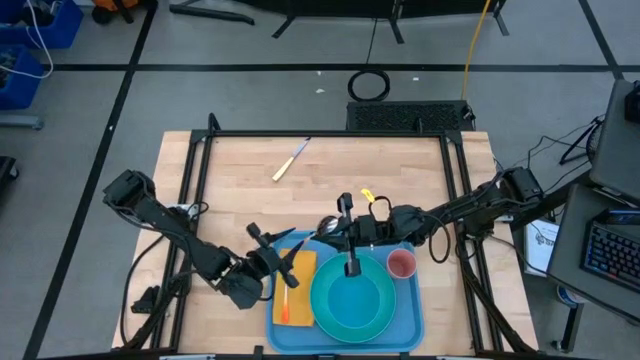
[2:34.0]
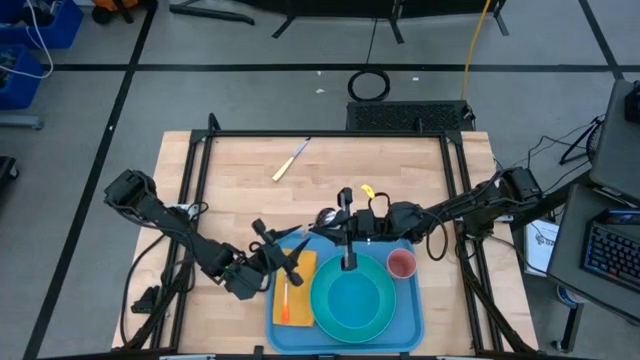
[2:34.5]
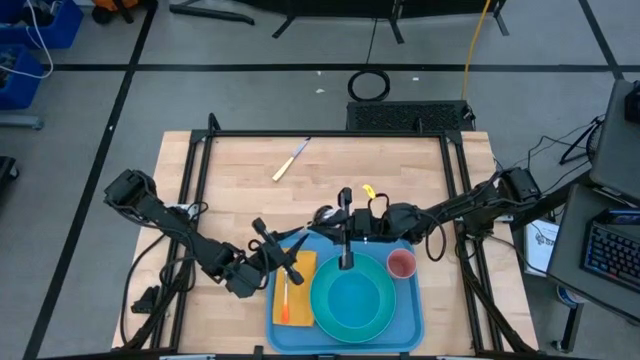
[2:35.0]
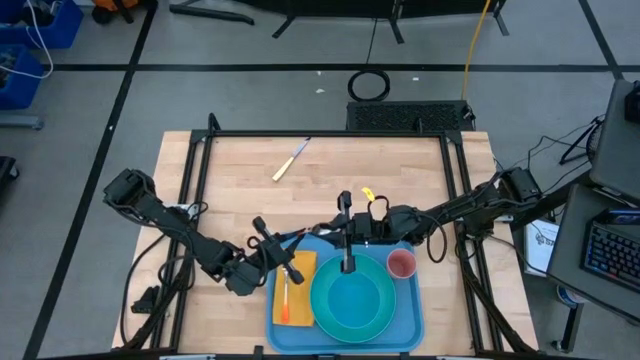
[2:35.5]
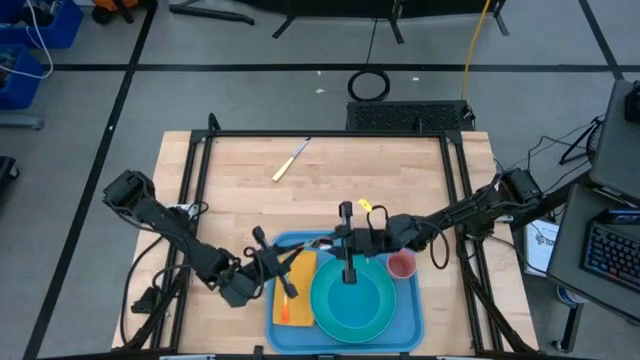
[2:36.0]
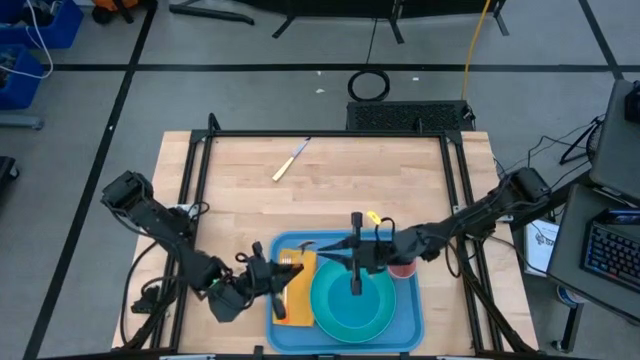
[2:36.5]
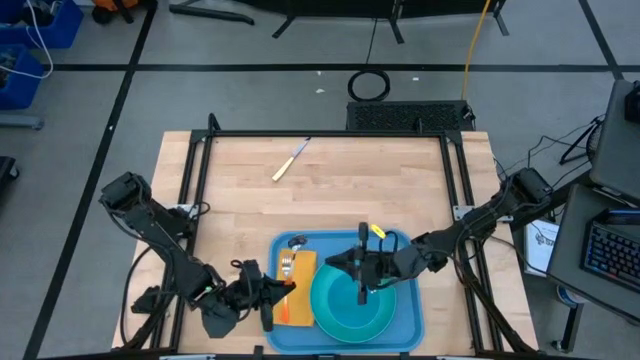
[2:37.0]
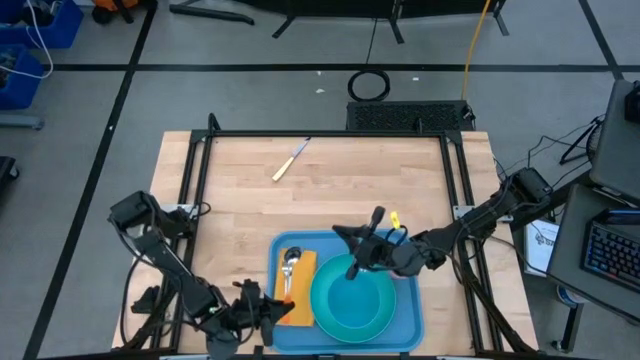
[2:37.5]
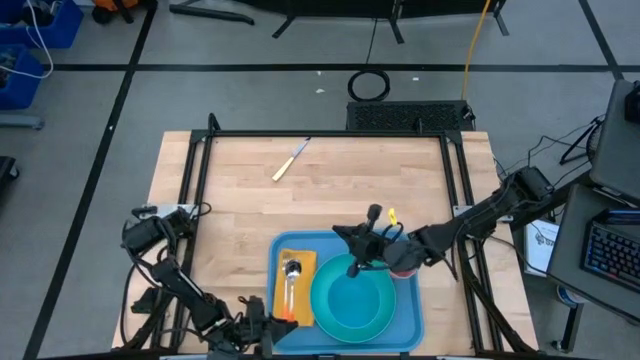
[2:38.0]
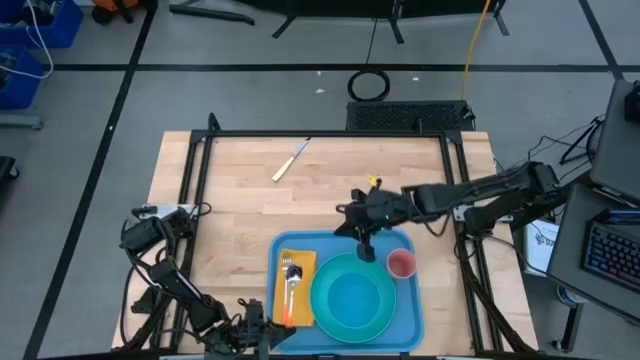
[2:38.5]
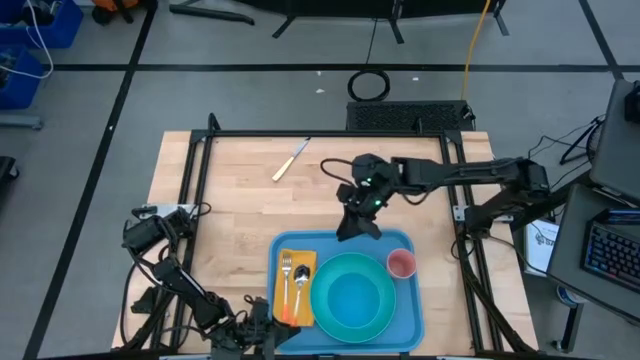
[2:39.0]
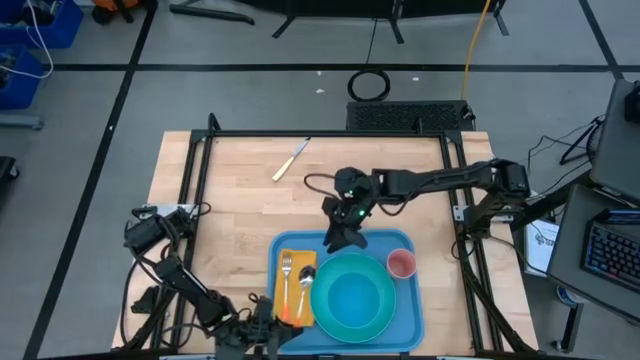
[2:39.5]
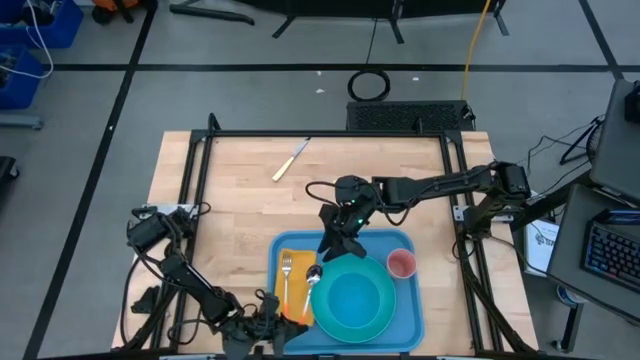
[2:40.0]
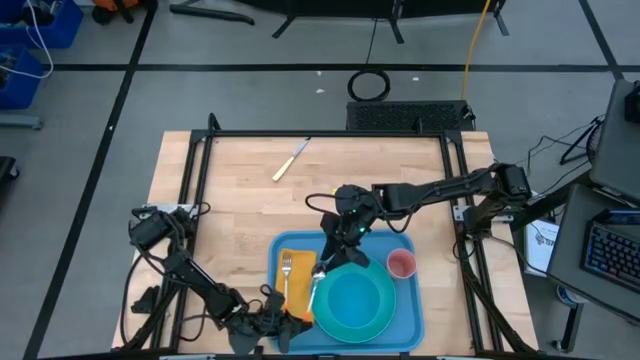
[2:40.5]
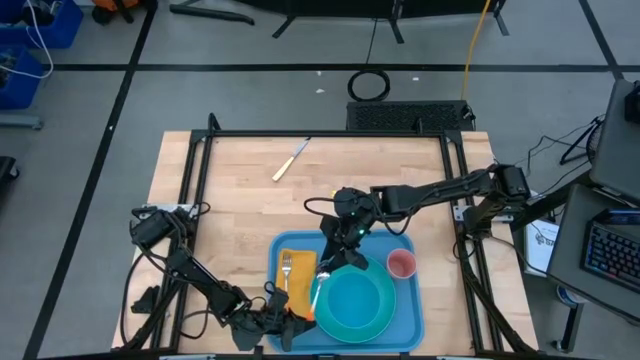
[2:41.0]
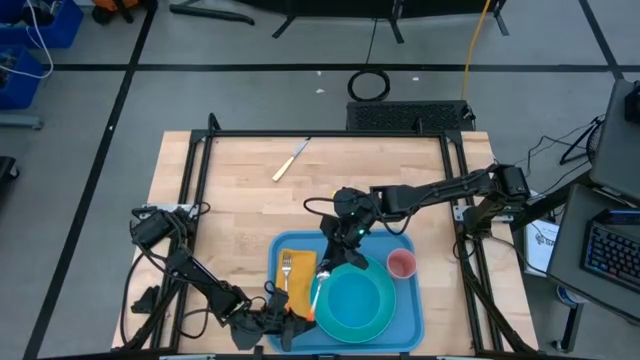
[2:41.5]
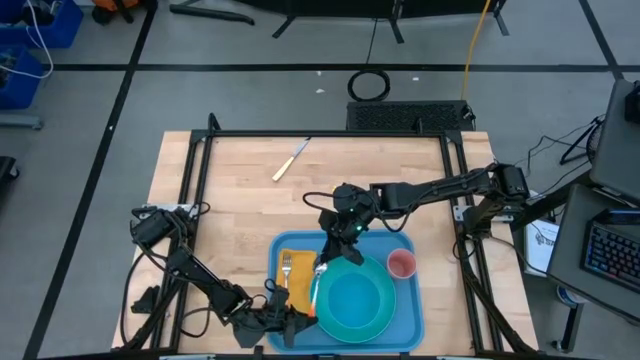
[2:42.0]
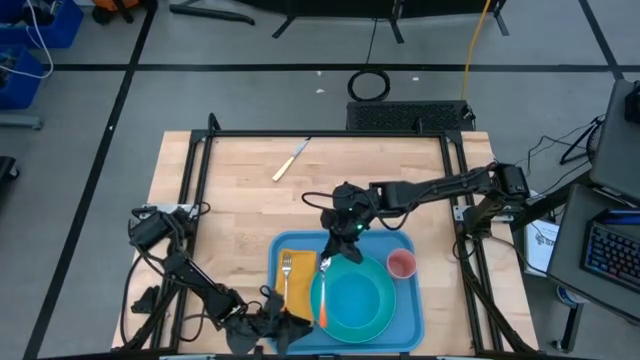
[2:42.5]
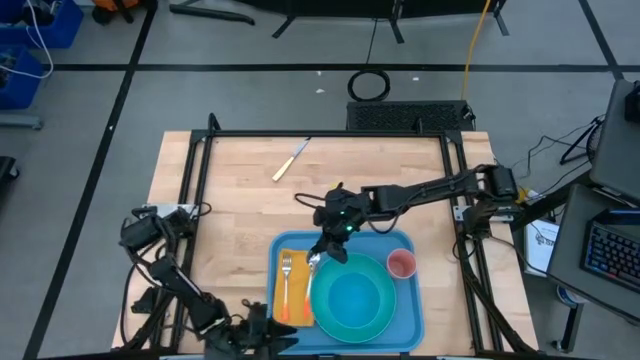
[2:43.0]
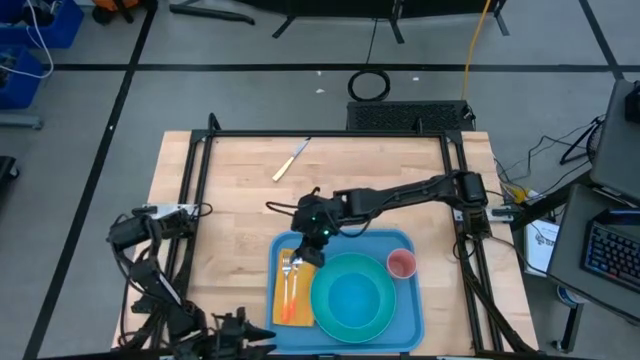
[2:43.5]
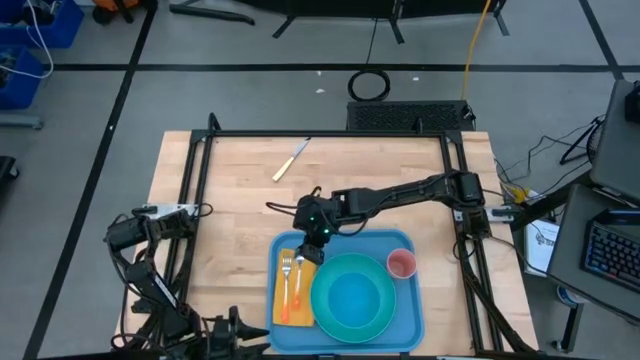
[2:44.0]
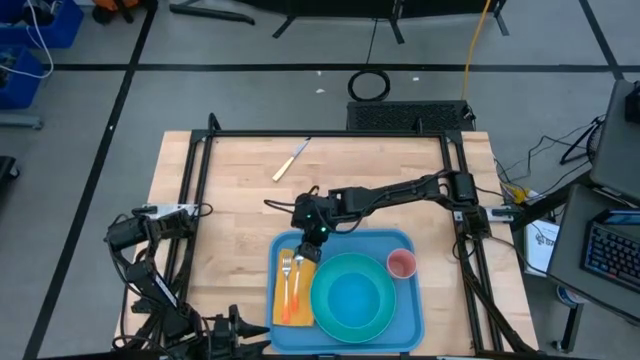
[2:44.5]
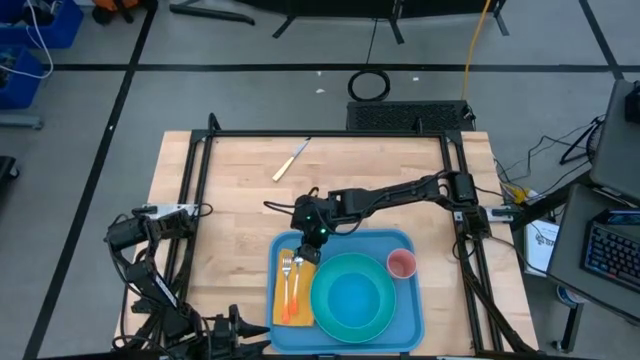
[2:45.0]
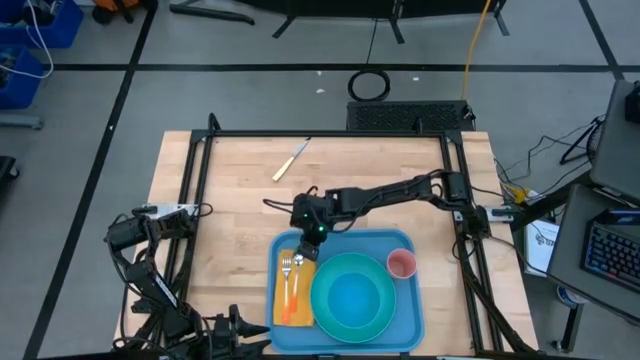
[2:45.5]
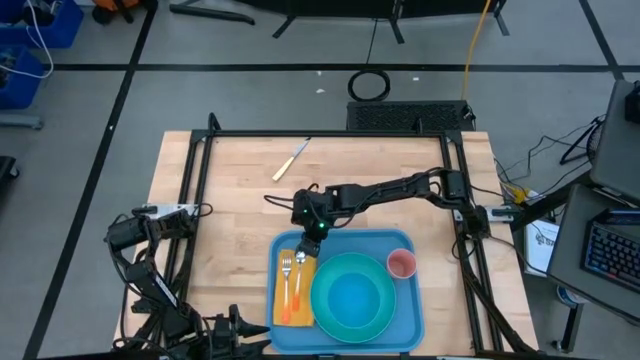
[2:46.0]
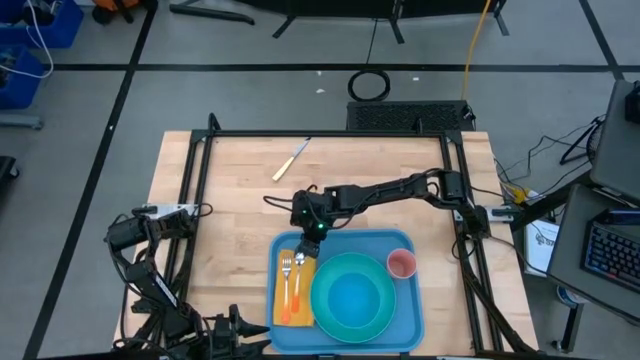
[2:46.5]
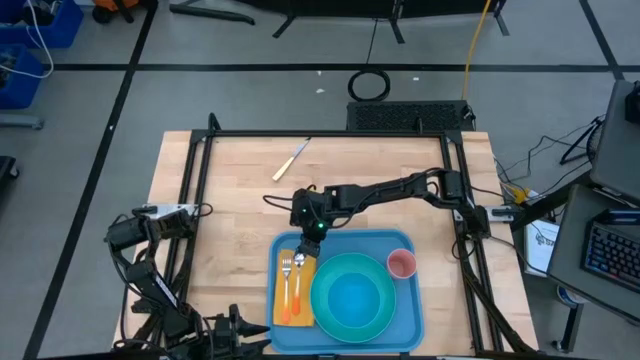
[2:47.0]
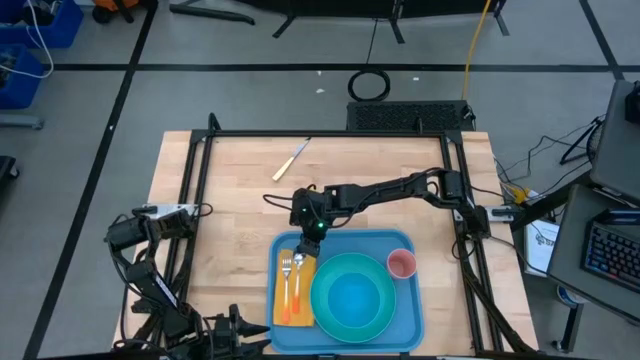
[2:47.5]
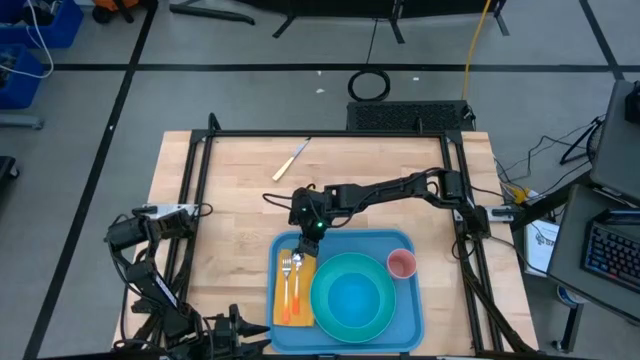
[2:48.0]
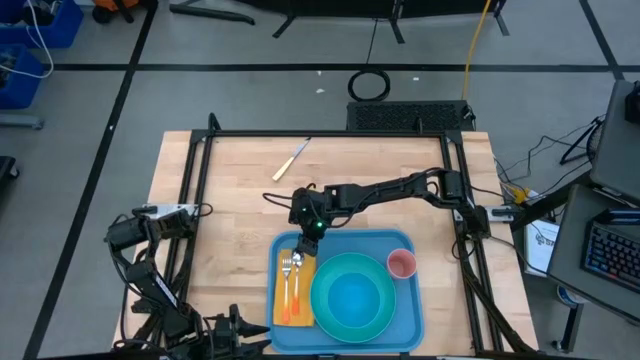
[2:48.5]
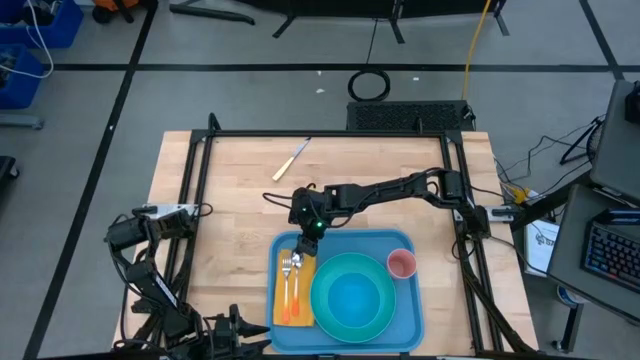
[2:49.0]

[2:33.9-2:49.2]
Task: Set up tray
Put the orange spoon on top of the yellow table napkin to the right of the orange fork

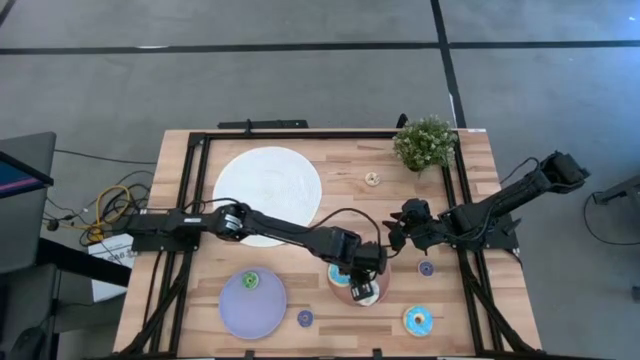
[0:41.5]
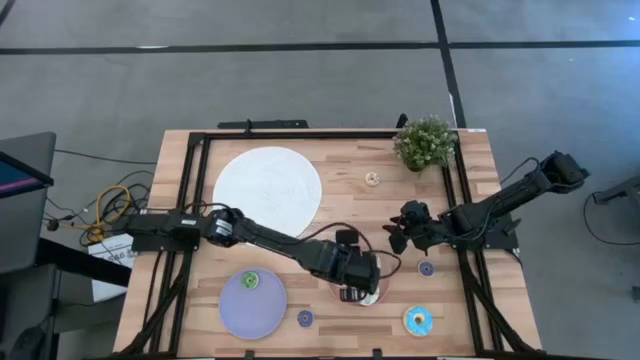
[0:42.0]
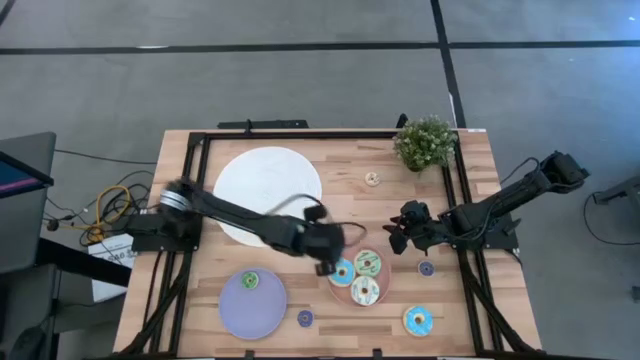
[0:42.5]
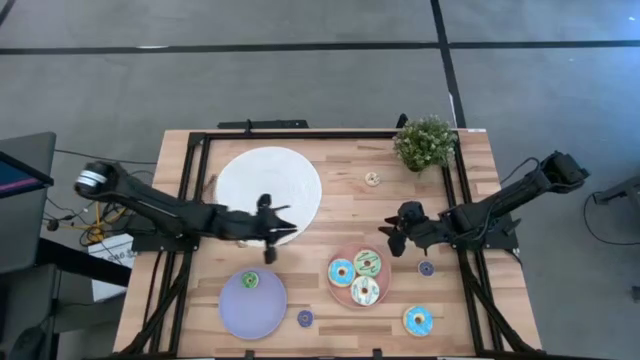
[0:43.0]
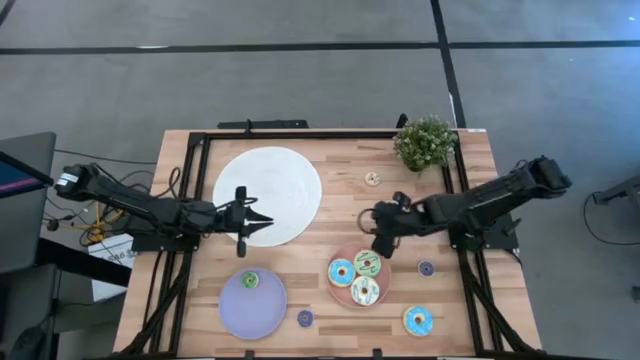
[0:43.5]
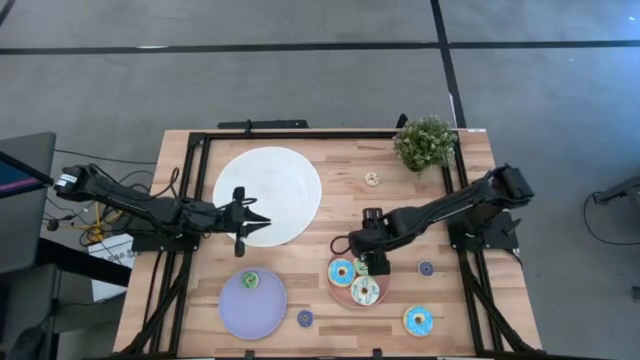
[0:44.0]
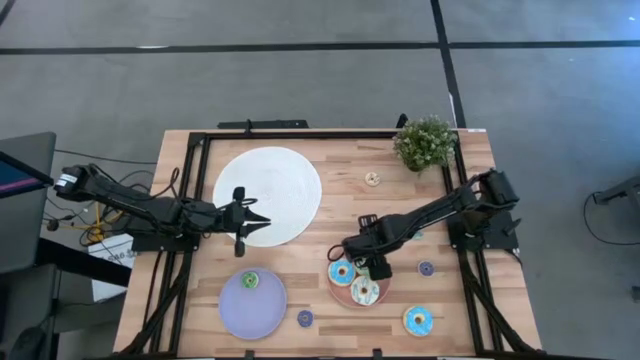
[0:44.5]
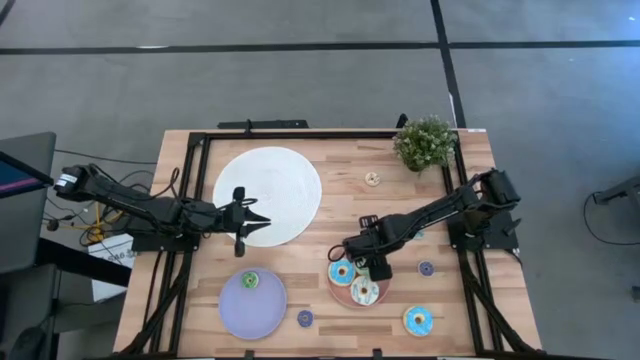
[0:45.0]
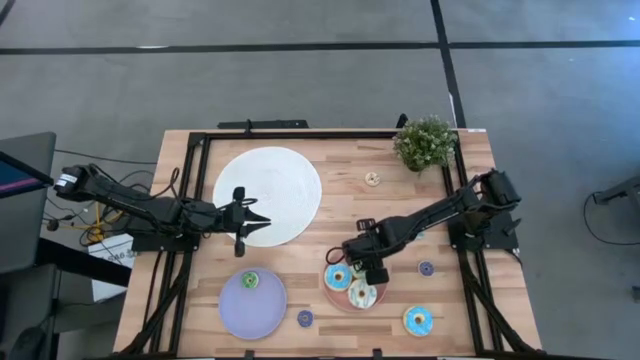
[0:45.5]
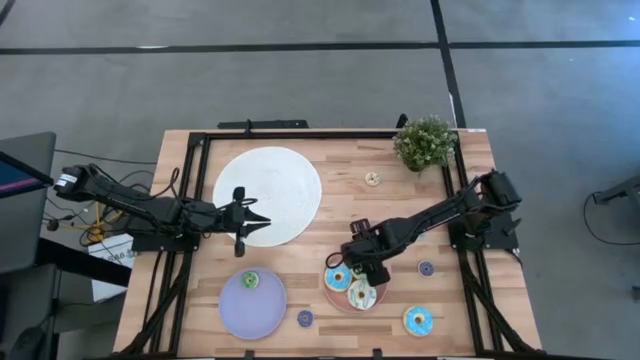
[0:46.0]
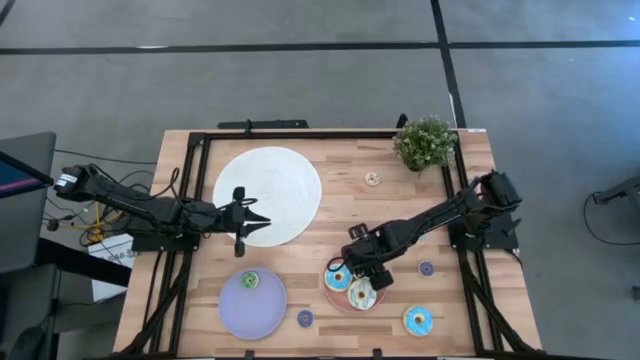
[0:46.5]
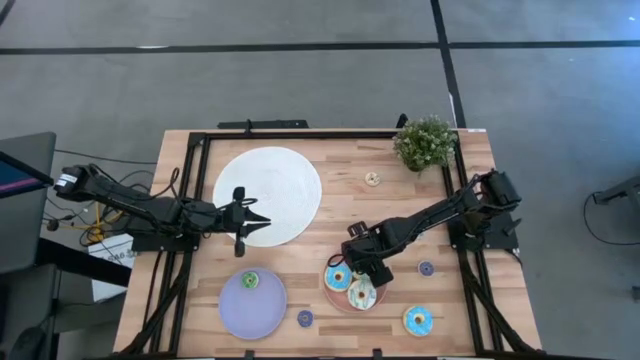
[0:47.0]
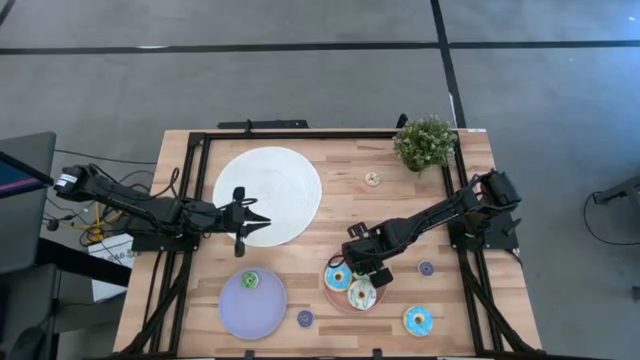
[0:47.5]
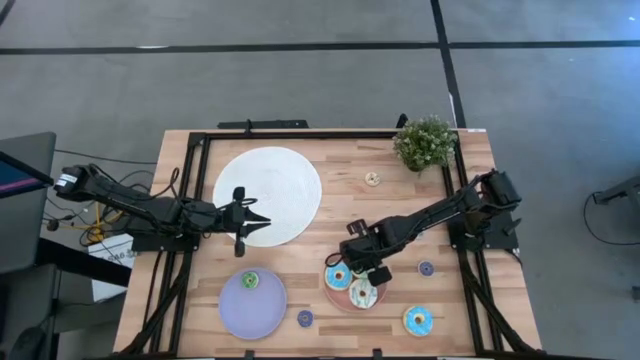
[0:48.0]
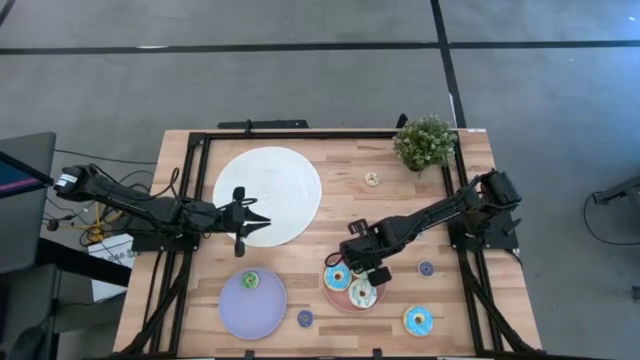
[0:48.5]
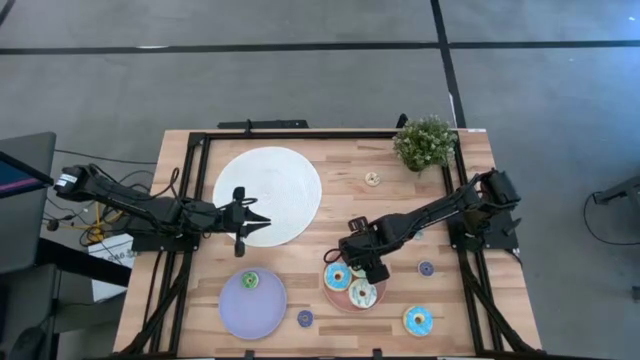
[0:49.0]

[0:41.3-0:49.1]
Task: Pick & Place donuts
Adjust the big green donut on the pink plate
